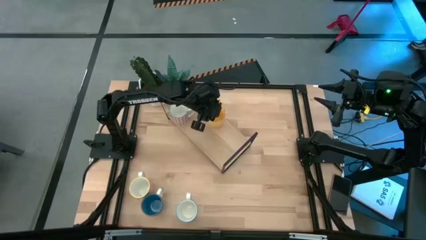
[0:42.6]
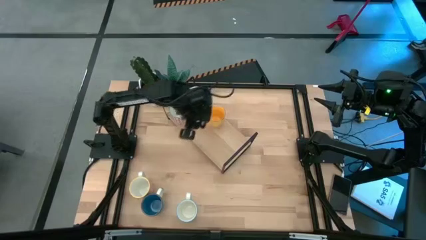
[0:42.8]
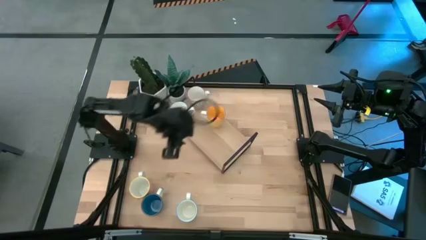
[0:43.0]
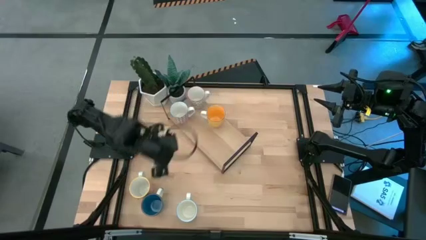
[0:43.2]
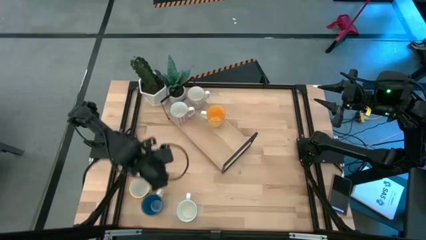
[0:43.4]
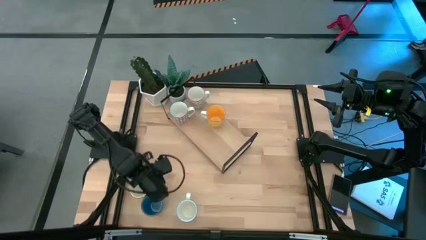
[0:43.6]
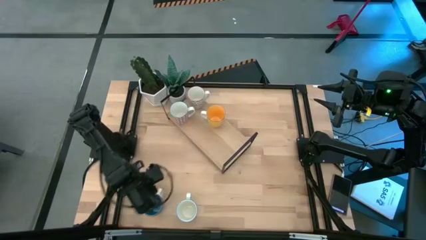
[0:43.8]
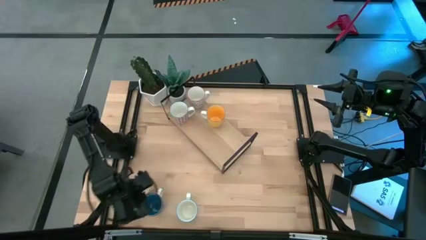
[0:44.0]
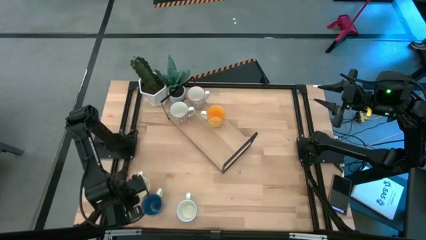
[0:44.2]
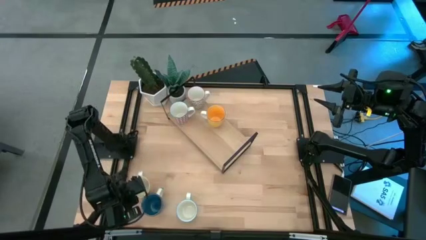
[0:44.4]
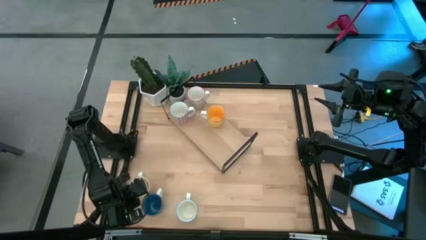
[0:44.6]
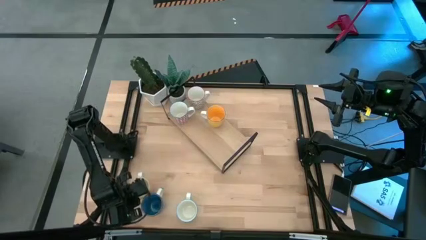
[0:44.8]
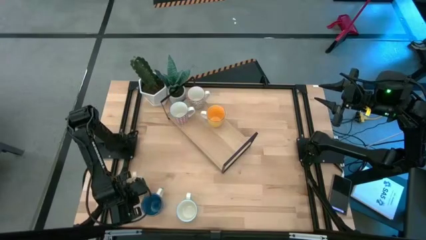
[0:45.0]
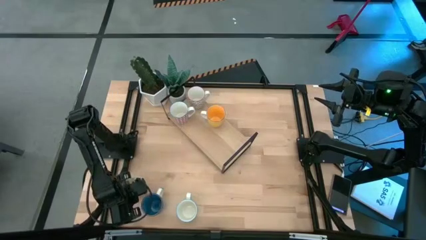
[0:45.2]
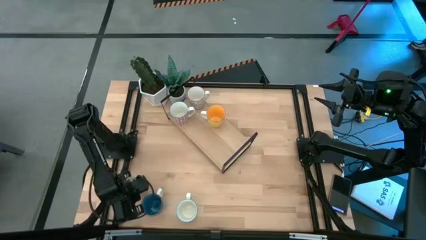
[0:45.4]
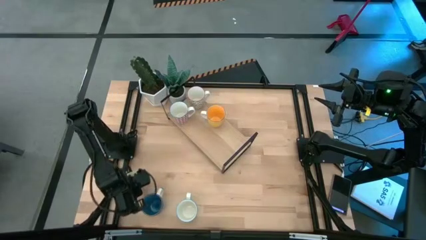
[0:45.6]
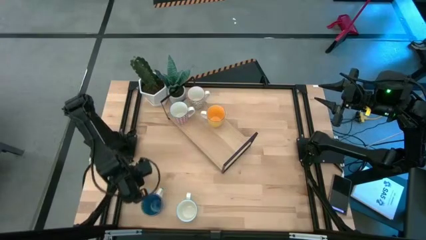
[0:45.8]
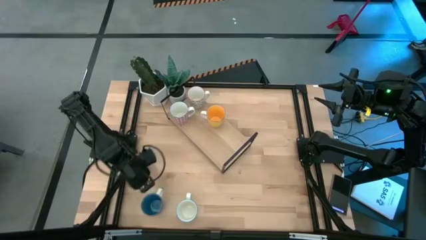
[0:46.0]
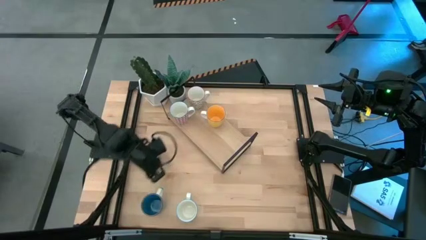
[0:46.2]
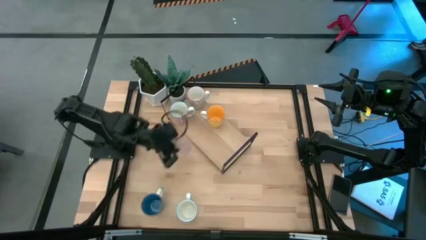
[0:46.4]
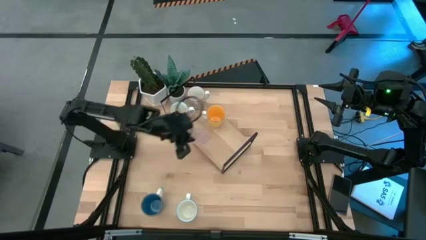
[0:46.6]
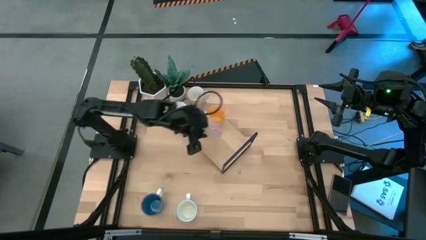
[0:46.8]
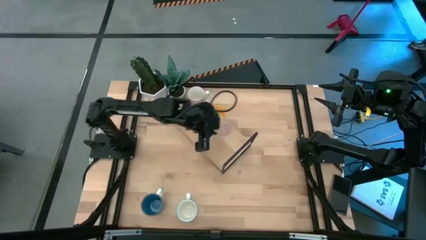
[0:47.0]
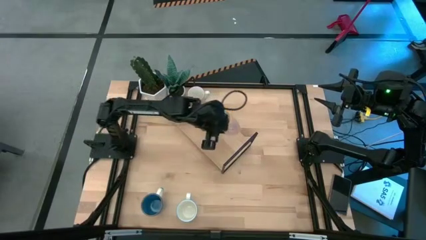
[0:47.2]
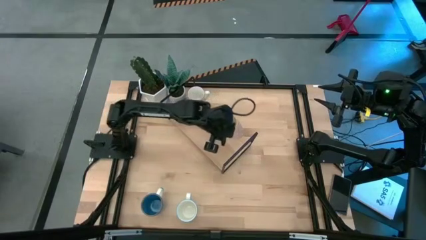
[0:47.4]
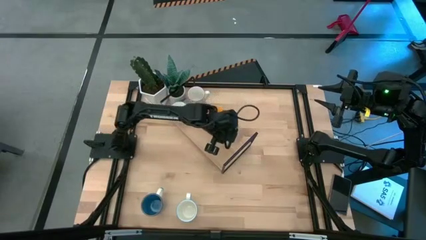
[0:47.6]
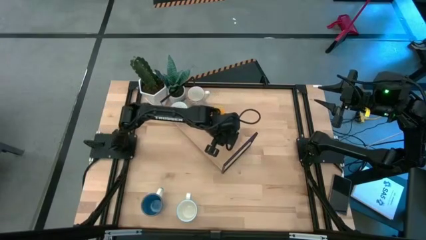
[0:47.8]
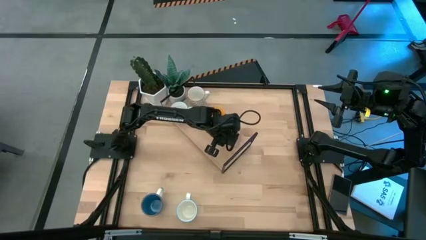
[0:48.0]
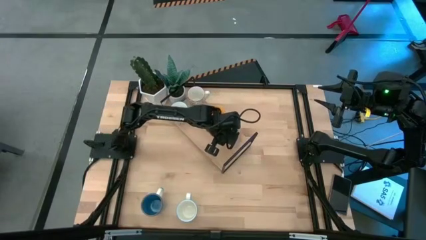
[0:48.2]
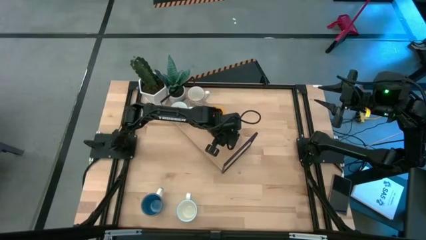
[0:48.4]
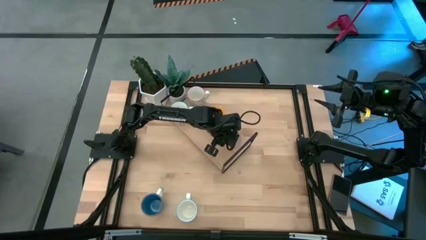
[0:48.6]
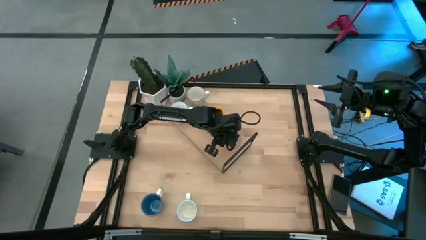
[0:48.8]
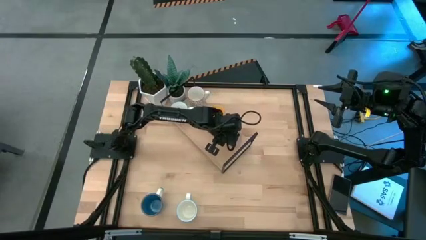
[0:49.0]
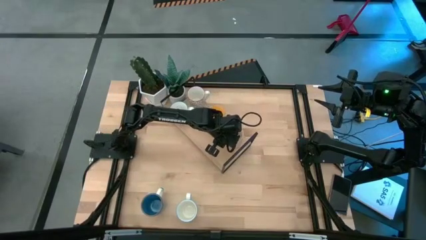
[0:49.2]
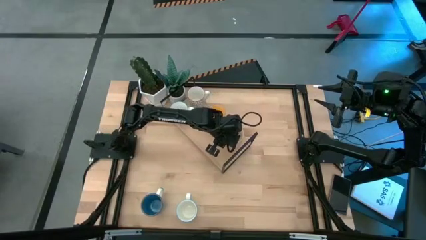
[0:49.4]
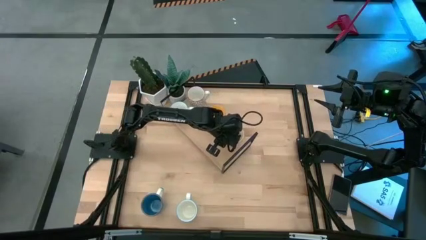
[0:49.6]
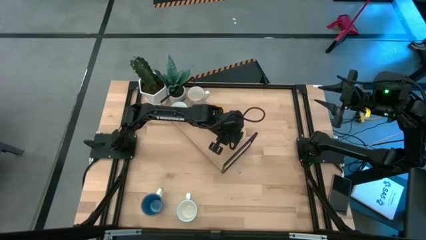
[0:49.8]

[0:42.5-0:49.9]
Task: Place coffee mugs
Put the orange mug on the shelf

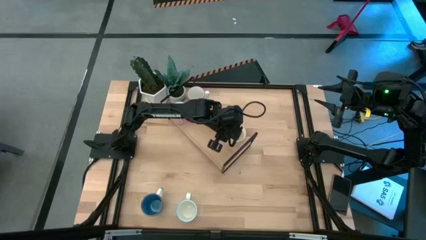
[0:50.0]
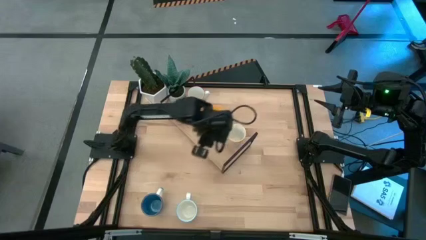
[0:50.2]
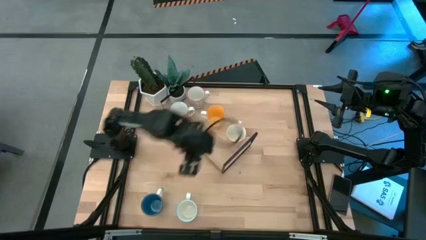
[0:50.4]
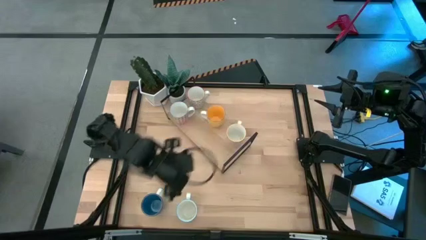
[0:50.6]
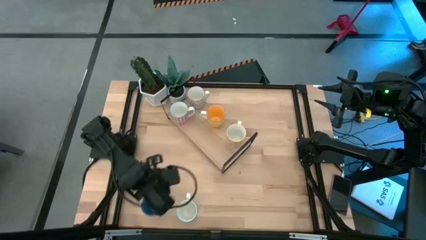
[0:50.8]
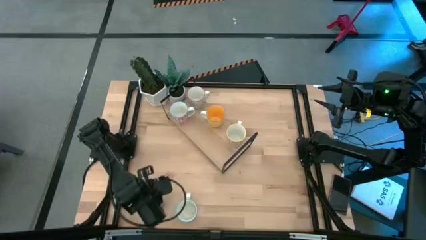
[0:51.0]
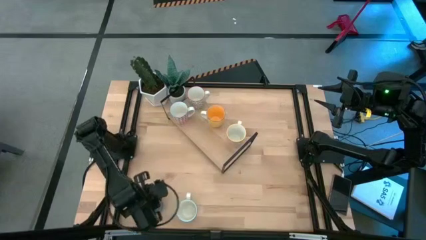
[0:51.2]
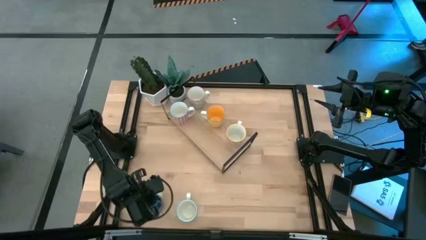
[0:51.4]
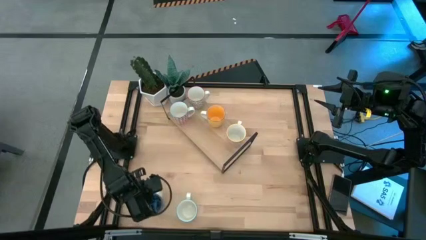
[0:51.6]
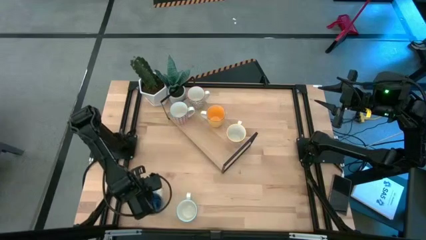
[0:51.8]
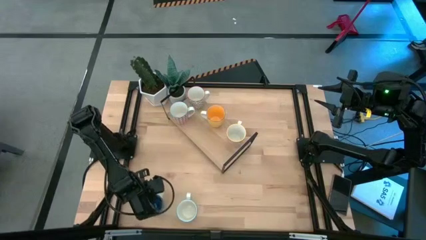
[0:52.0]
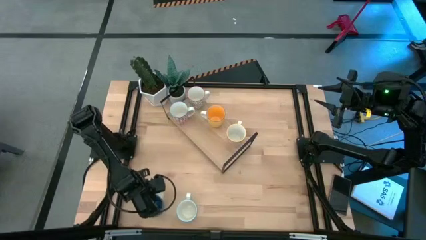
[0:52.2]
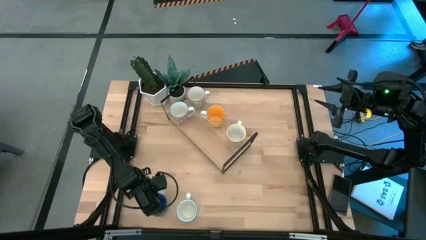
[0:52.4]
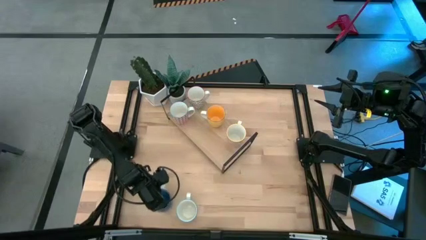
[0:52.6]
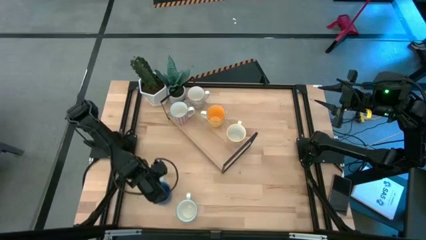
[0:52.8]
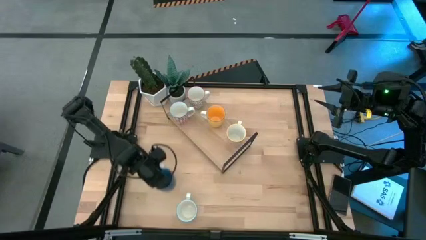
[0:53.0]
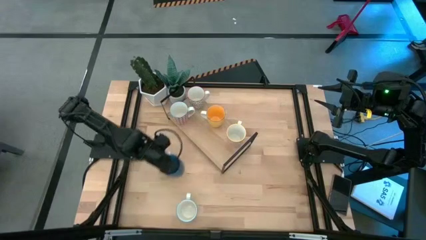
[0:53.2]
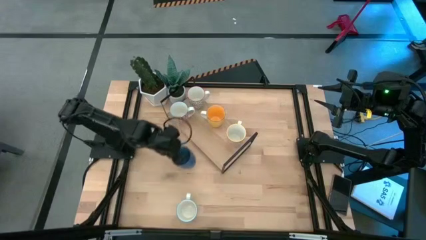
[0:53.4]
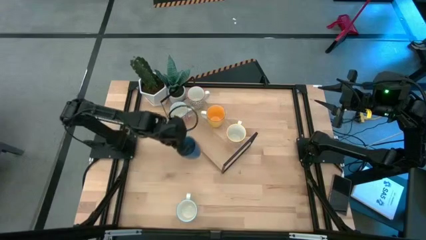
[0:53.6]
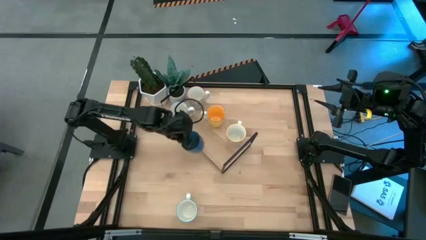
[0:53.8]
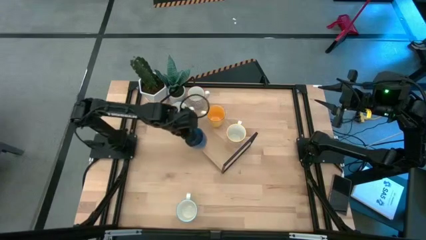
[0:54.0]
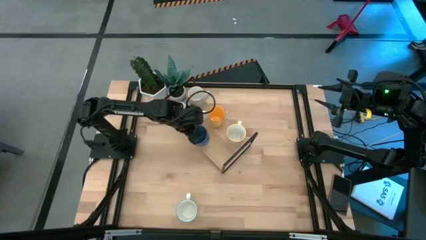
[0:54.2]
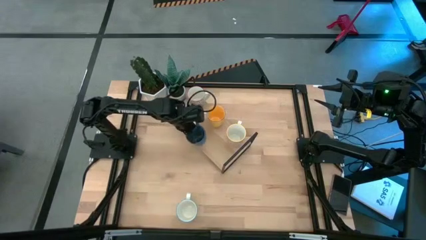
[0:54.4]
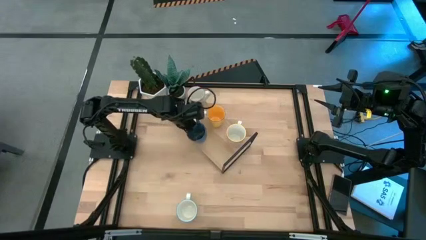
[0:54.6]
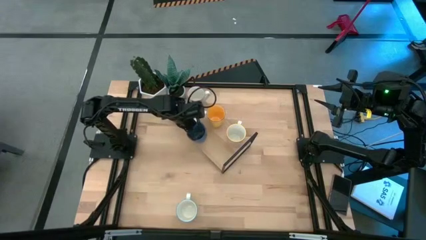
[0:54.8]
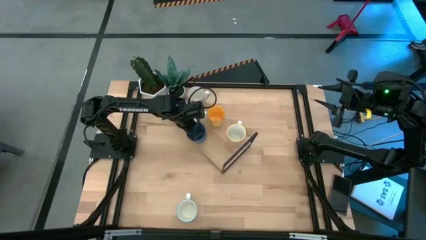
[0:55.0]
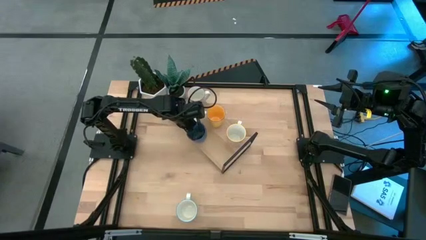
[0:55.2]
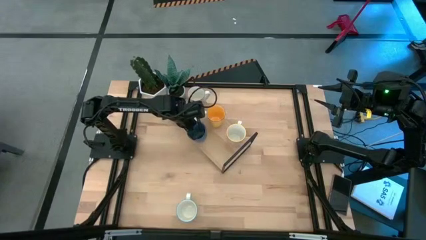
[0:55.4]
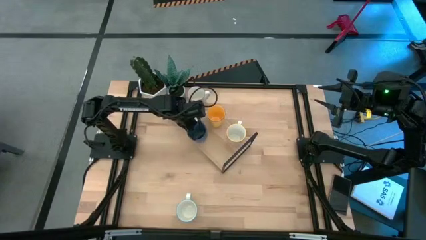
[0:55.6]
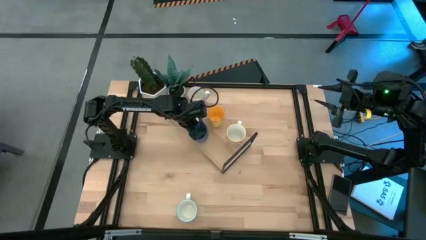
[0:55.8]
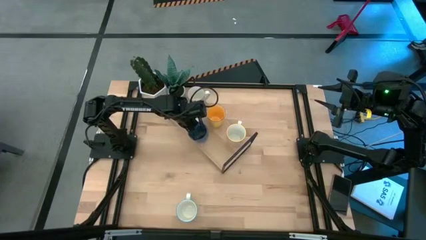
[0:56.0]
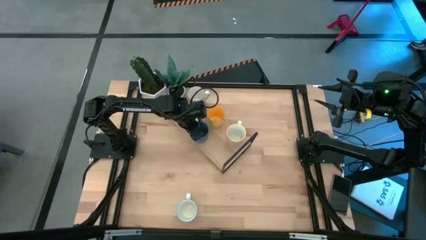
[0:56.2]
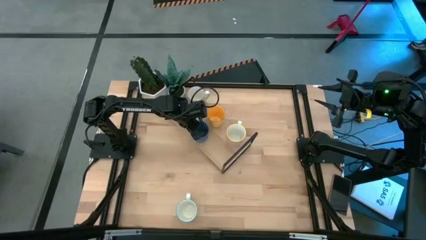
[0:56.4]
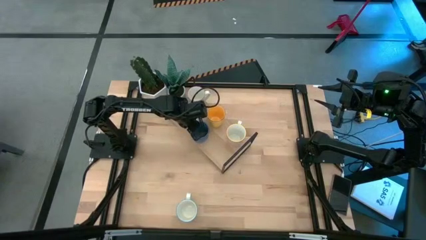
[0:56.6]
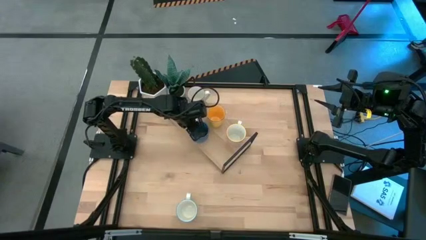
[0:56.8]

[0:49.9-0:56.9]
Put the blue mug on the shelf

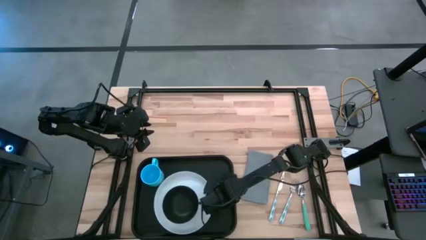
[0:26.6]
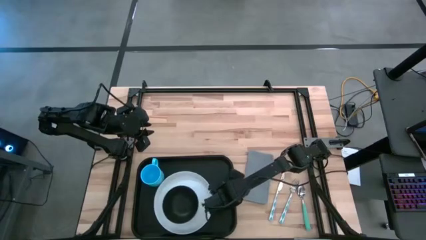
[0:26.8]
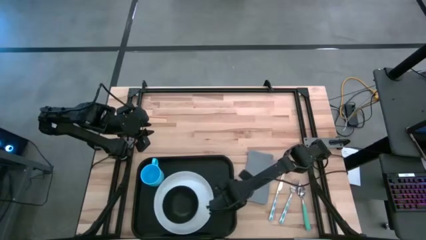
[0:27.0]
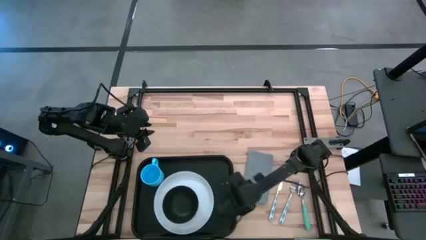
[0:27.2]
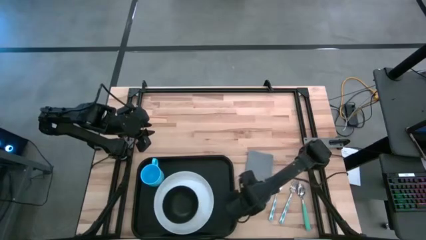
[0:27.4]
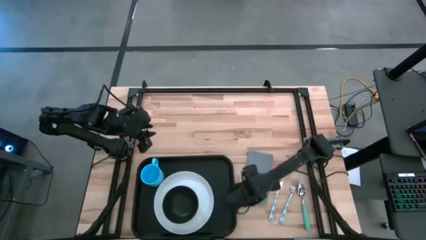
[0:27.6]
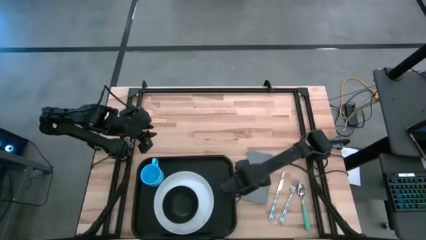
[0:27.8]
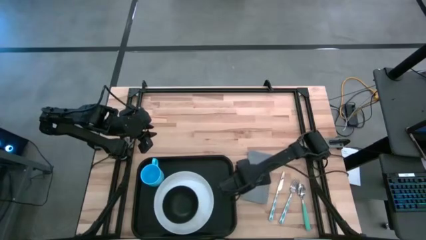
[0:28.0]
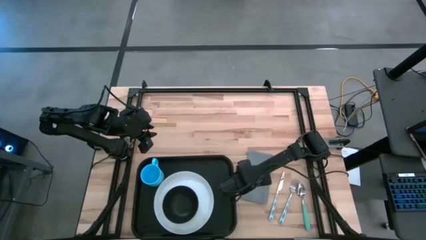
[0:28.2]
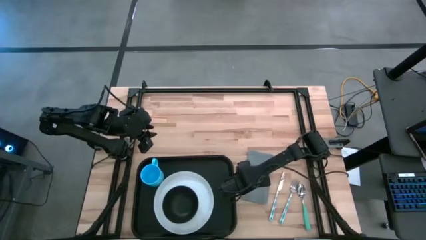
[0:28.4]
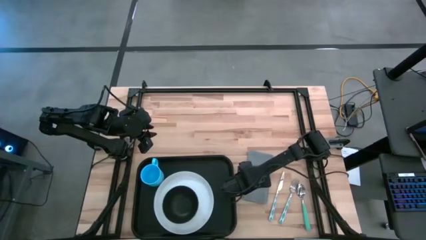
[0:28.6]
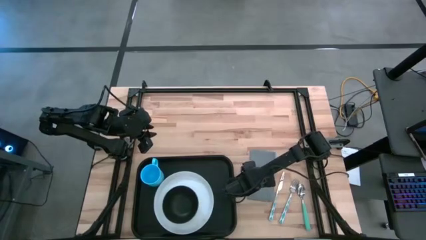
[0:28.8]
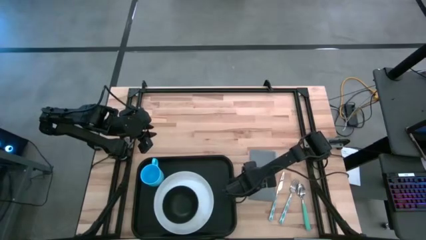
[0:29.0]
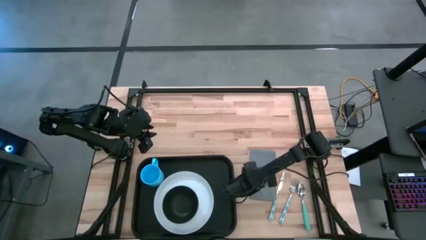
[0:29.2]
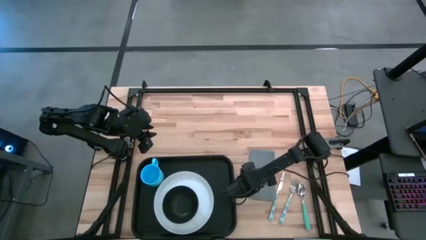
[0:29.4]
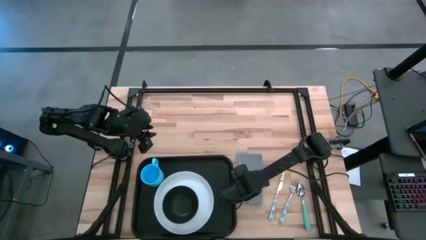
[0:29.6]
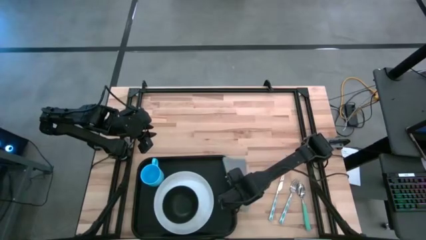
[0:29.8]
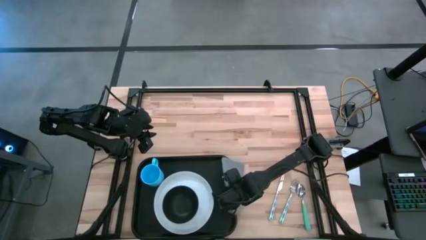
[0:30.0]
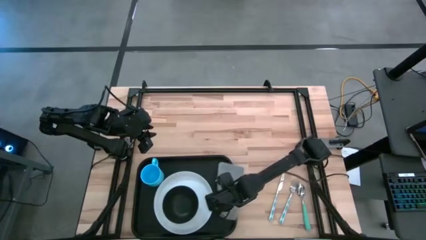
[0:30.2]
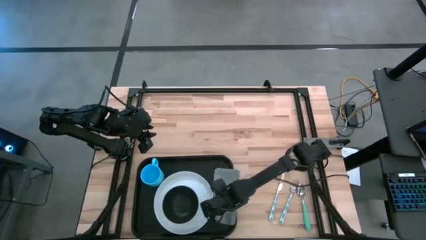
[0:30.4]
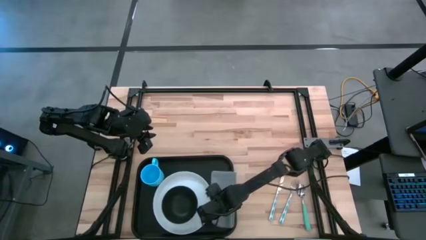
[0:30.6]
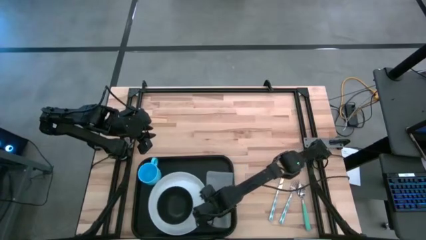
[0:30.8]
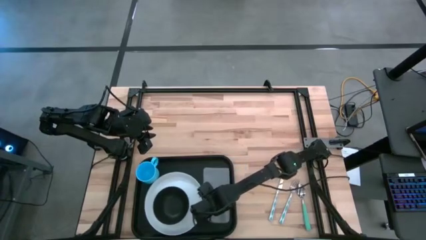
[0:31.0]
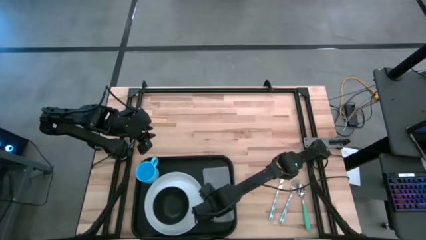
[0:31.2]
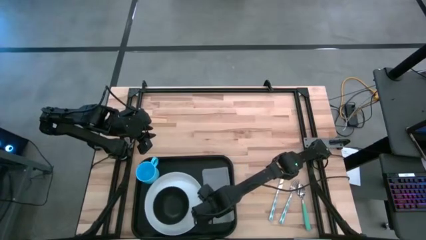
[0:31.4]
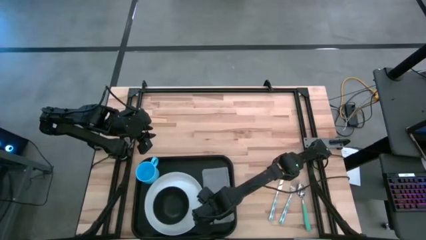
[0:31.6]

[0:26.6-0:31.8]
Task: Set up tray
Put the gray napkin on the serving tray to the right of the white plate
